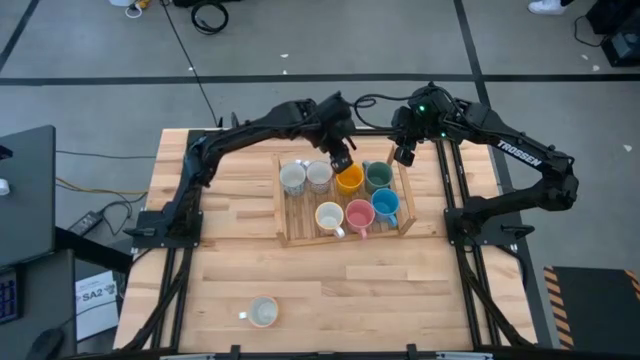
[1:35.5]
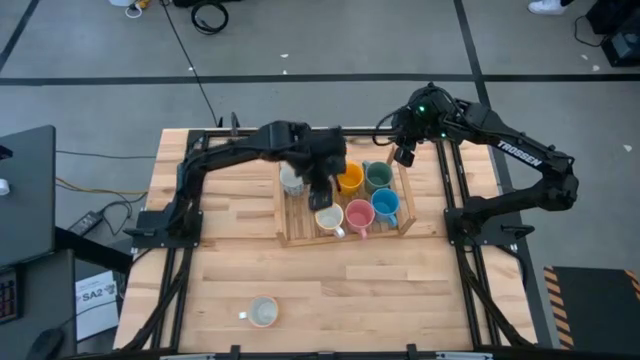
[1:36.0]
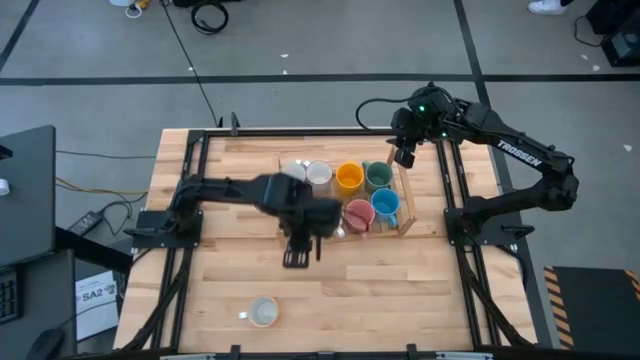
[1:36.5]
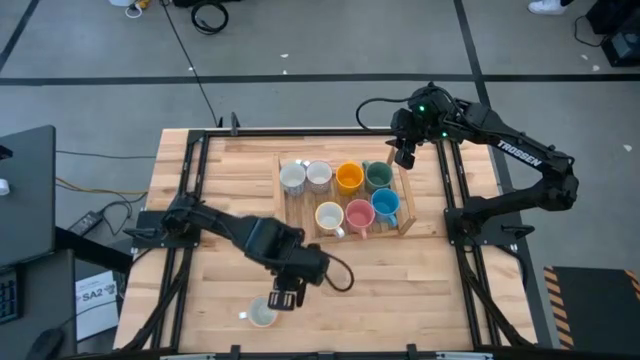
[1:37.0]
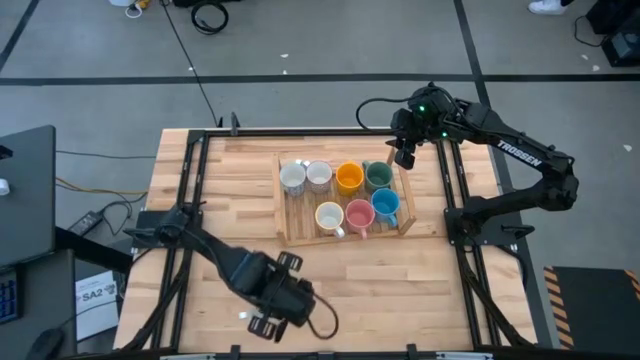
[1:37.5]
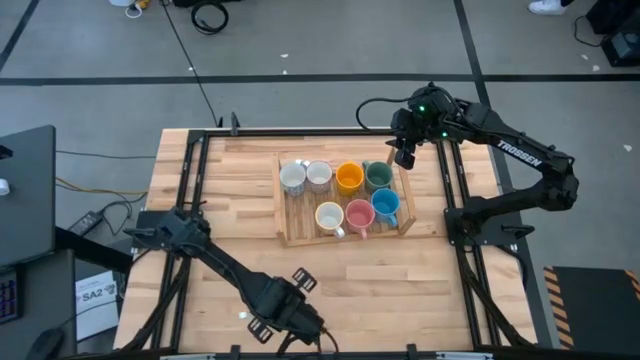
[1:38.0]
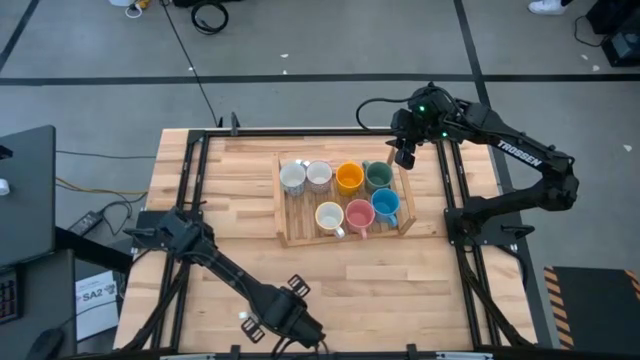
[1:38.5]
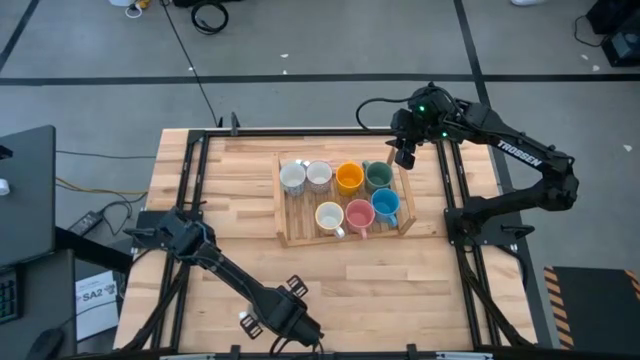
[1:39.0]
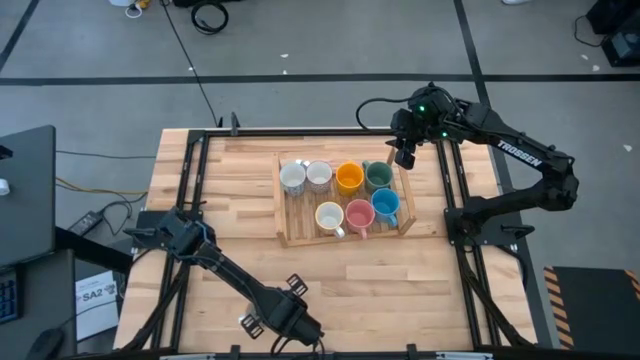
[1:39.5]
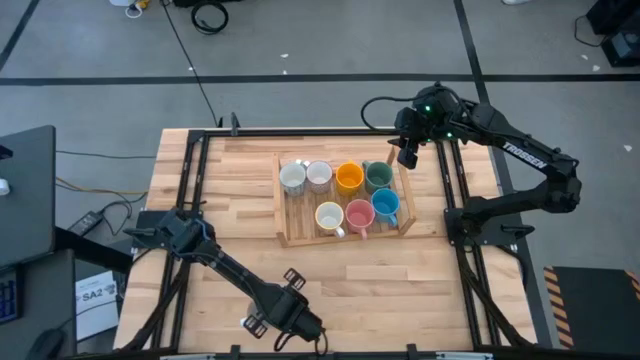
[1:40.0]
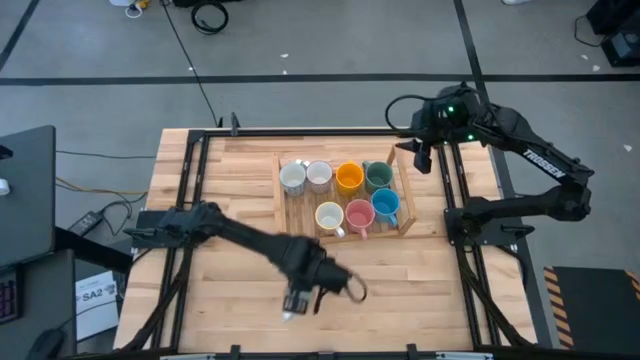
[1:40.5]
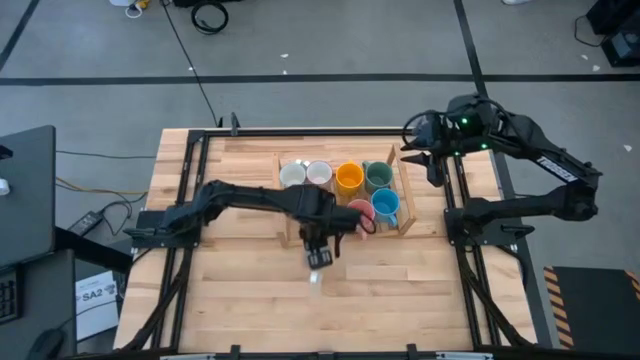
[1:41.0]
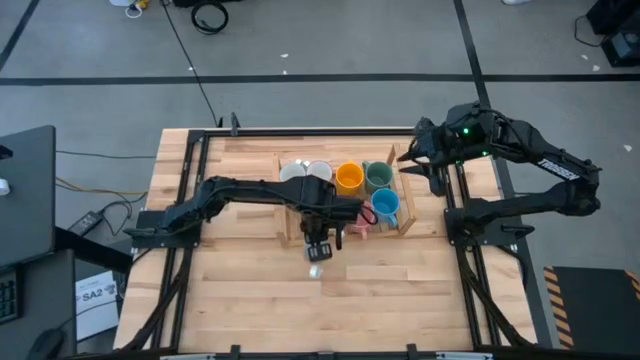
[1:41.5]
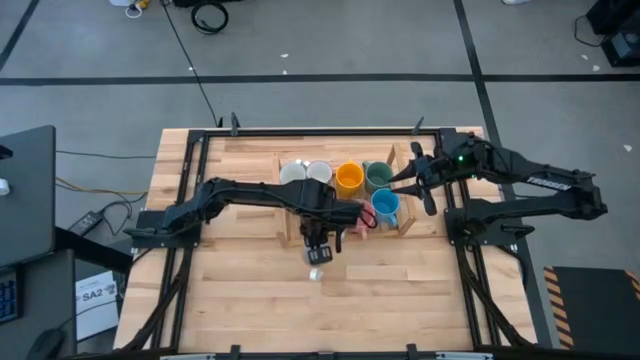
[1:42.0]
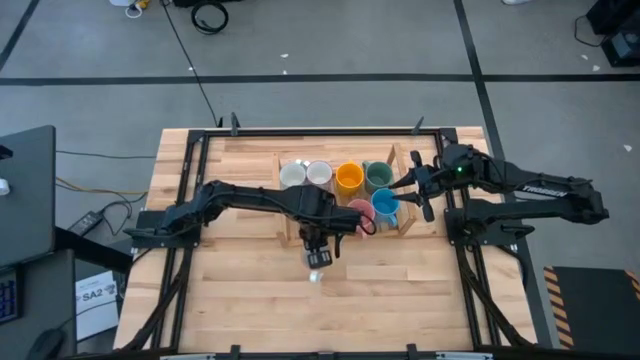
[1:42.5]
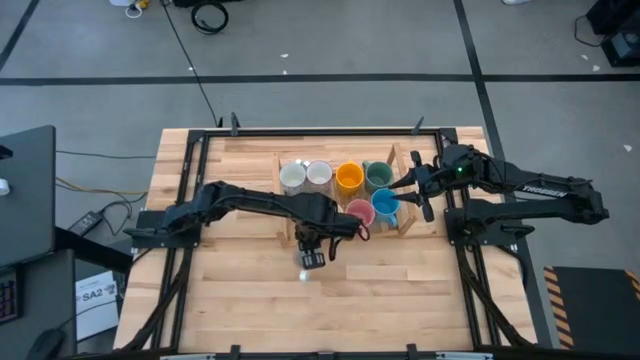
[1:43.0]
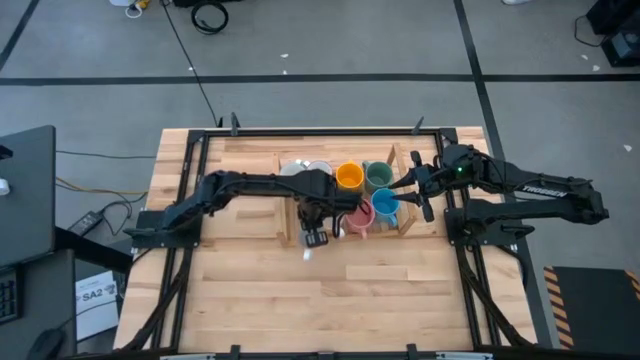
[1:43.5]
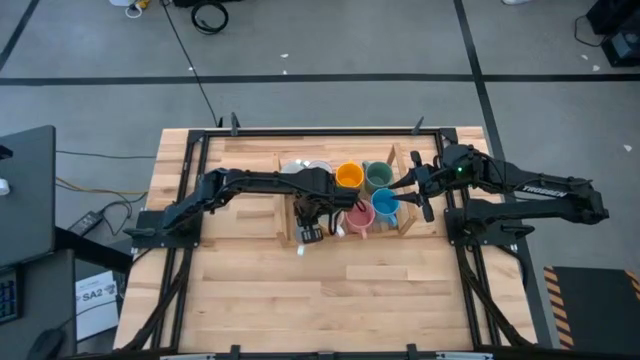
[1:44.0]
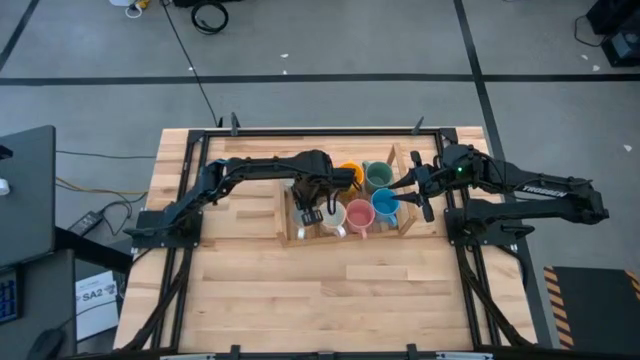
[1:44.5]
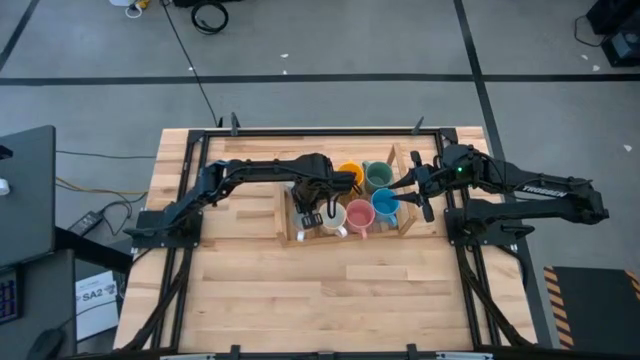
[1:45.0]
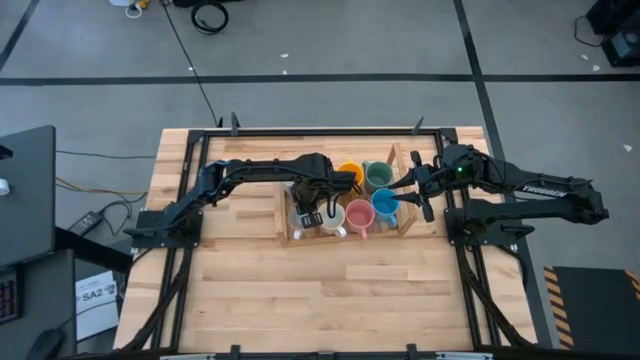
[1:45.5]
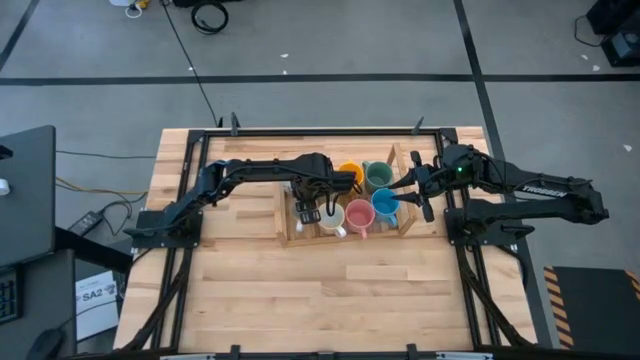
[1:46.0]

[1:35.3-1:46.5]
Task: Place coffee mugs
Put the yellow cup on the shelf aligned with the blue cup

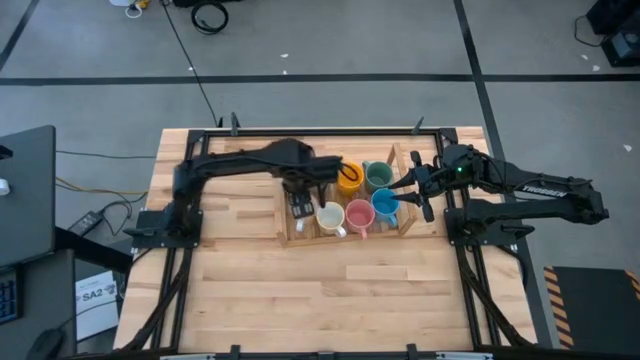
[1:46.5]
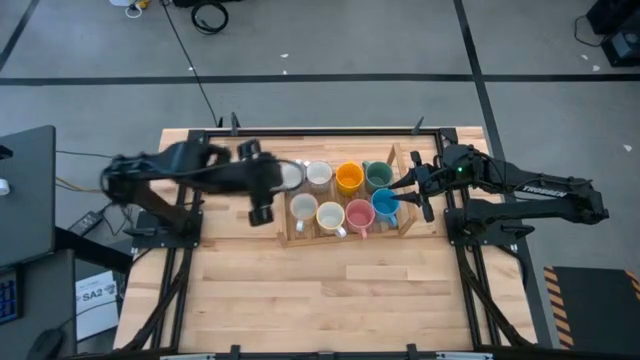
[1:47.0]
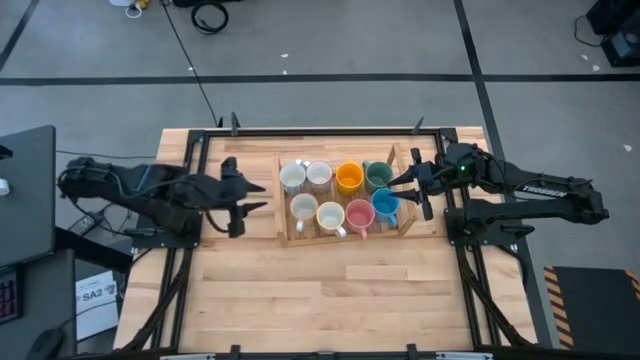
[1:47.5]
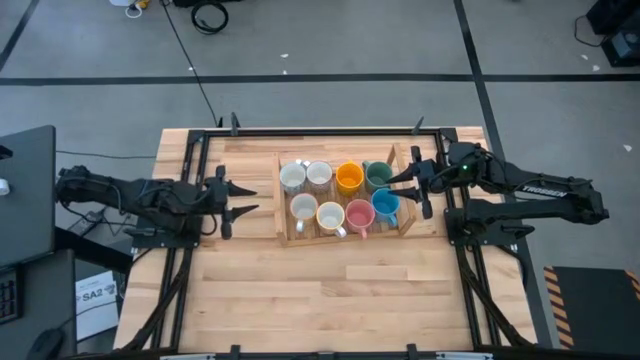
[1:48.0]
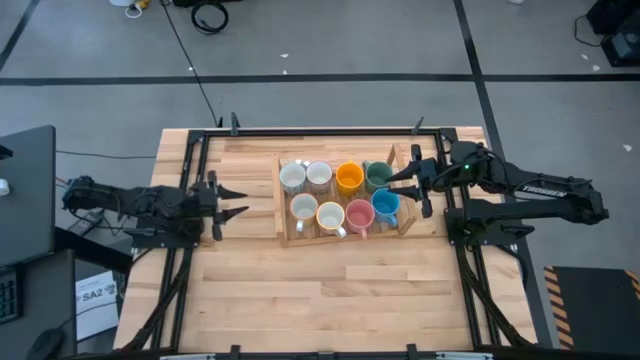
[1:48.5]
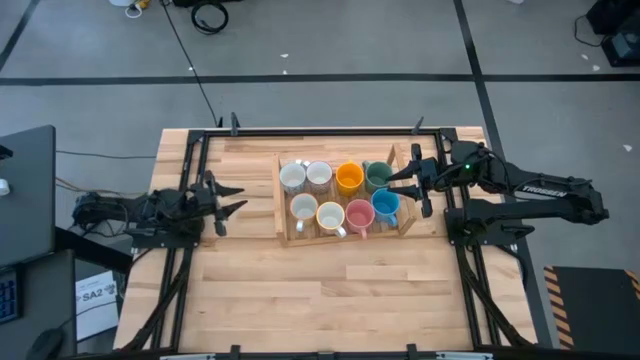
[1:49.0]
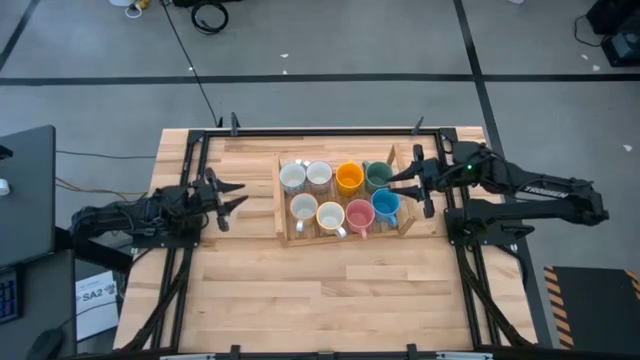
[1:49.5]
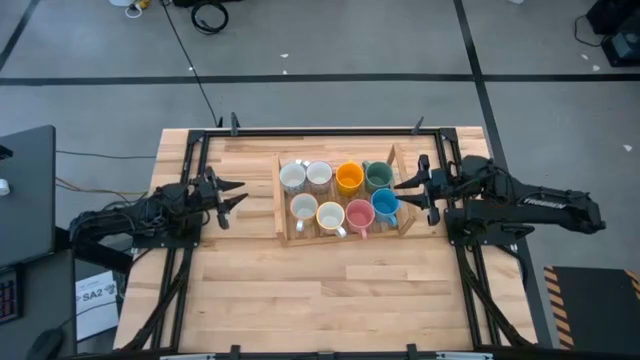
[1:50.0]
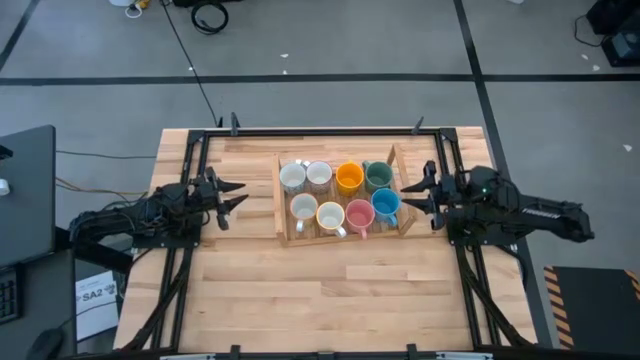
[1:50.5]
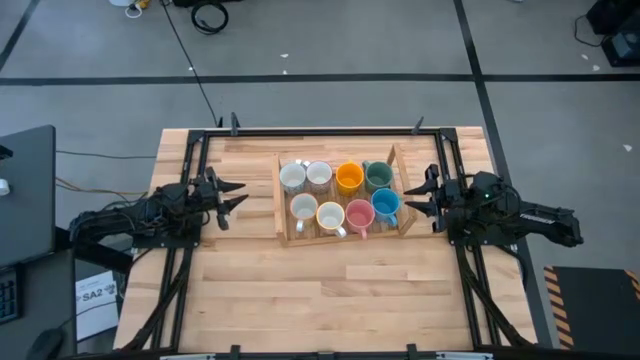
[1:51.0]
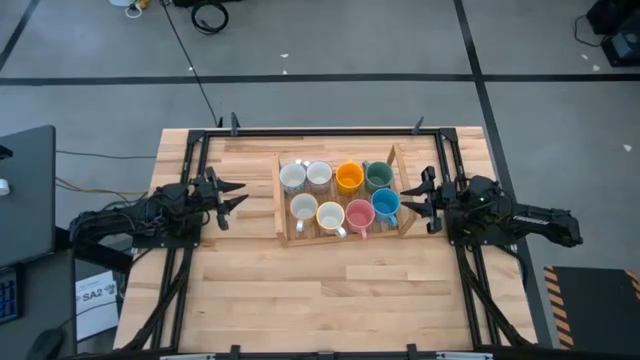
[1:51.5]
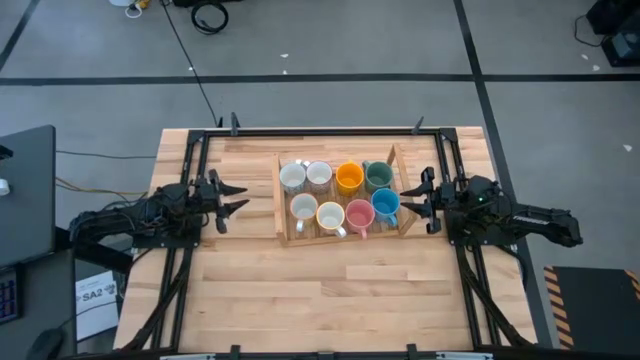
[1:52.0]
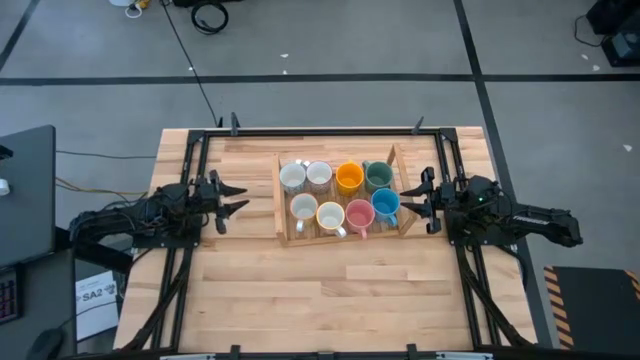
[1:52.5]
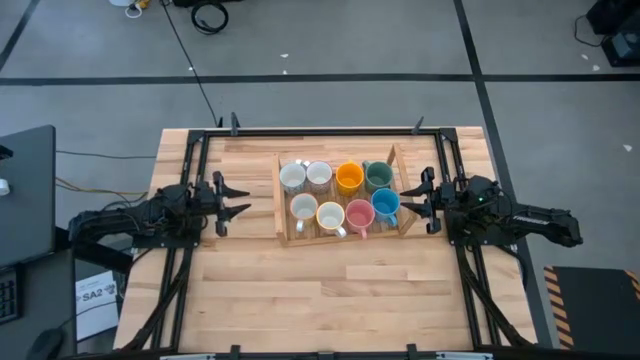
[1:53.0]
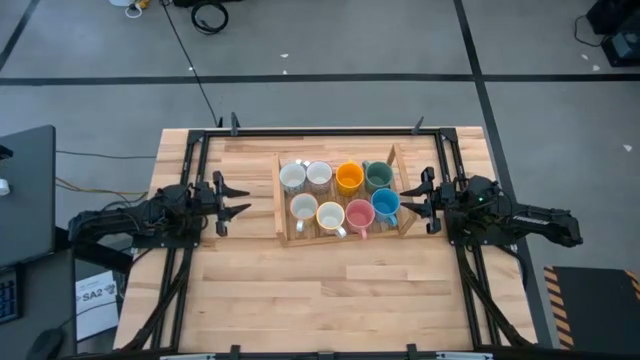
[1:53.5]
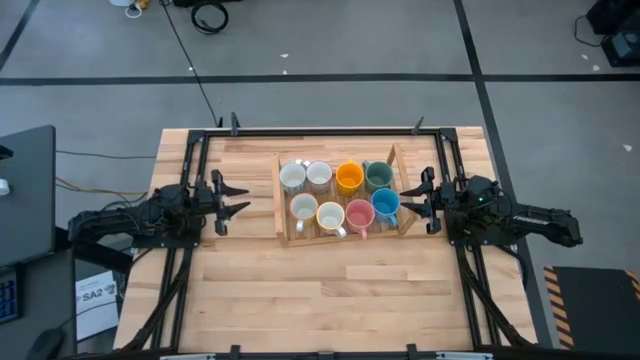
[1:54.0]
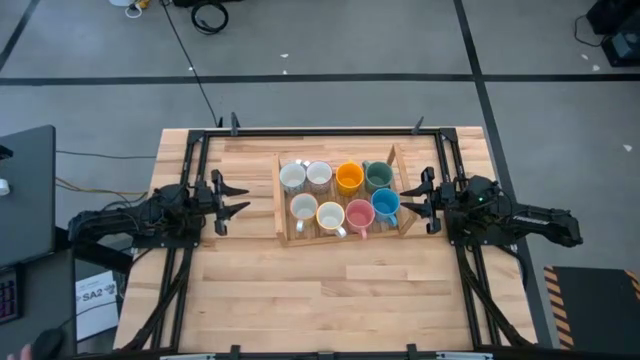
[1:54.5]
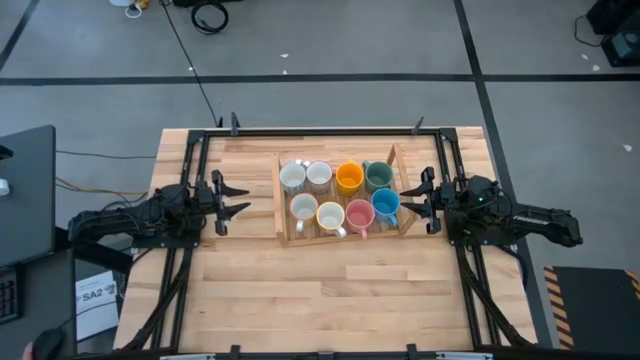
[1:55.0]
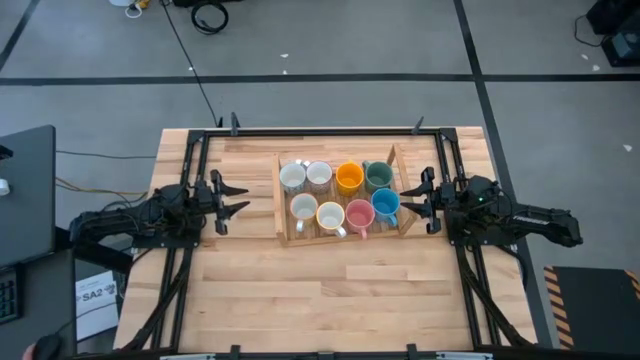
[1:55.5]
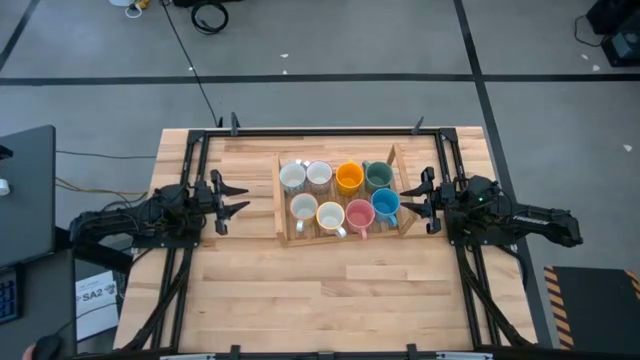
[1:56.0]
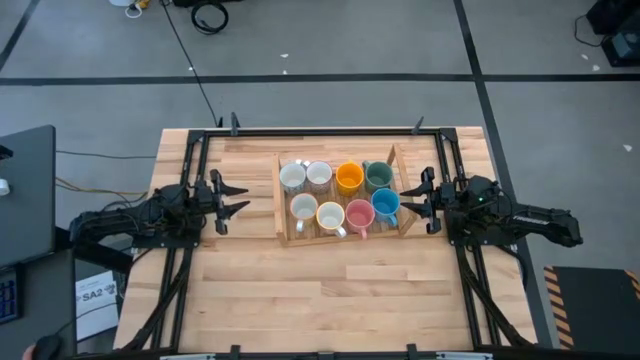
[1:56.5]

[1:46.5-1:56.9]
Return to Home Position
